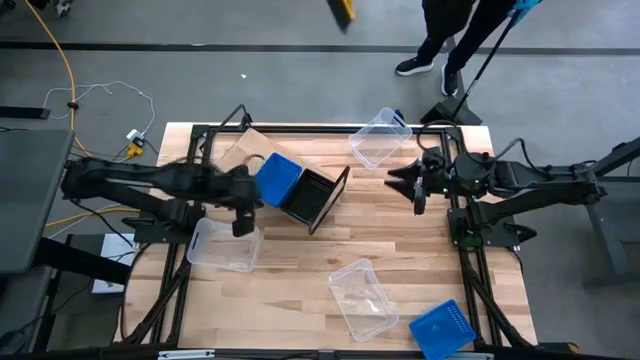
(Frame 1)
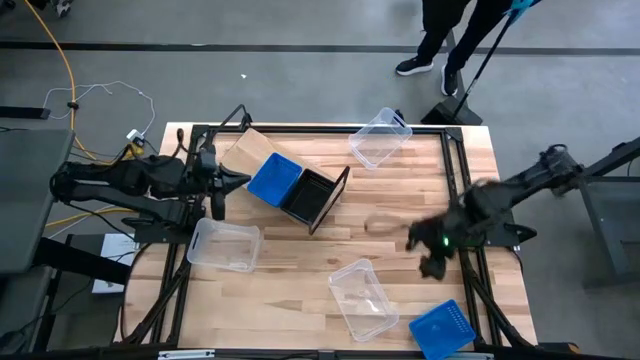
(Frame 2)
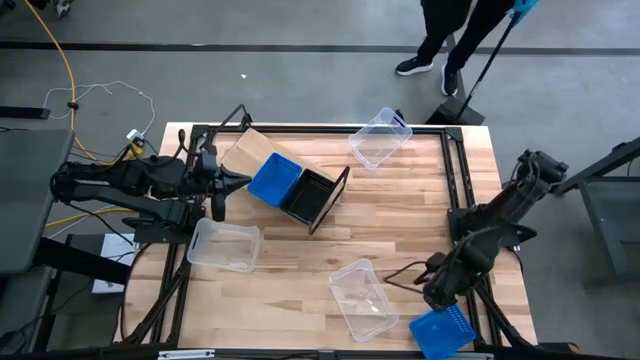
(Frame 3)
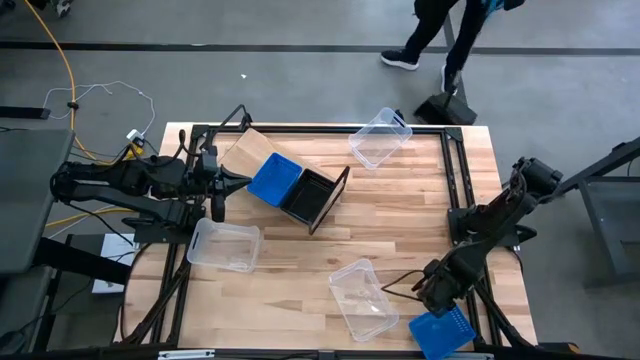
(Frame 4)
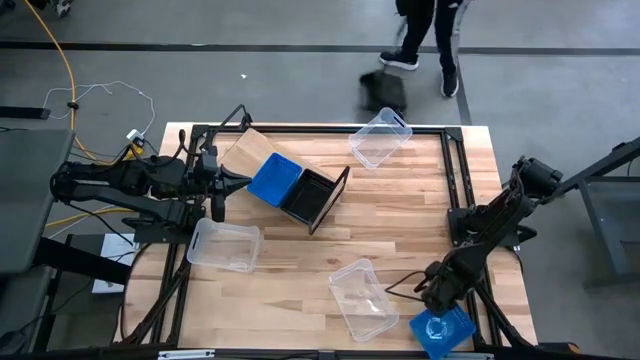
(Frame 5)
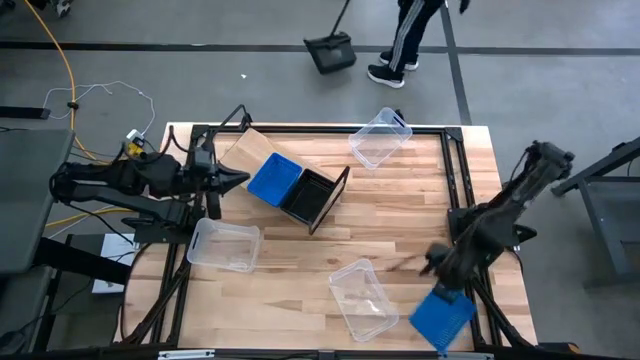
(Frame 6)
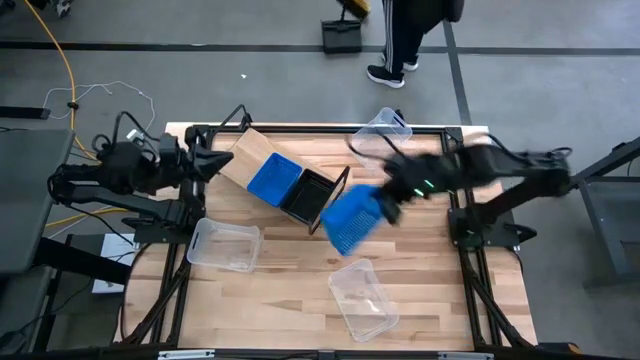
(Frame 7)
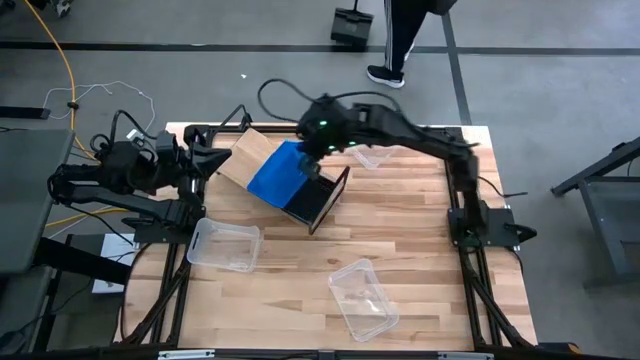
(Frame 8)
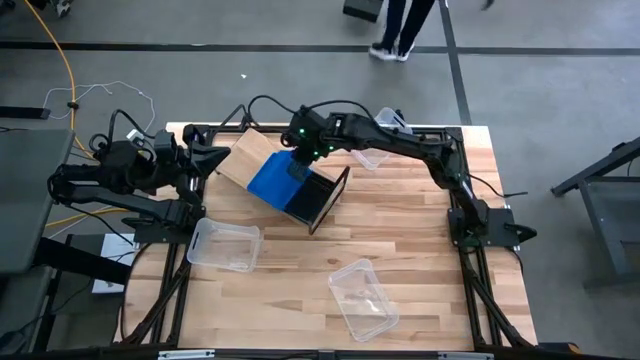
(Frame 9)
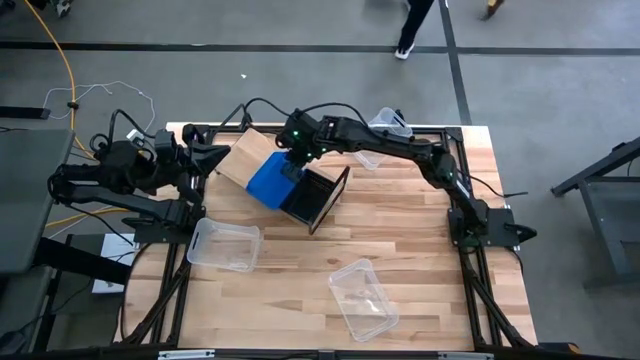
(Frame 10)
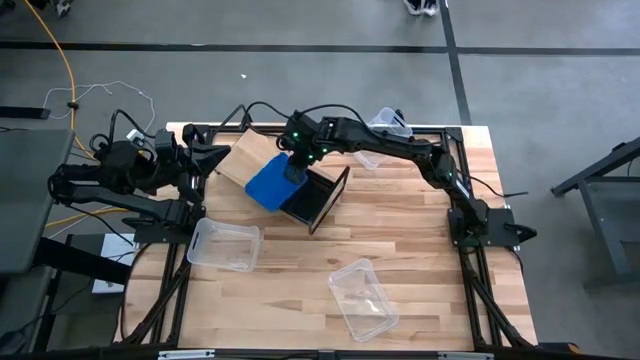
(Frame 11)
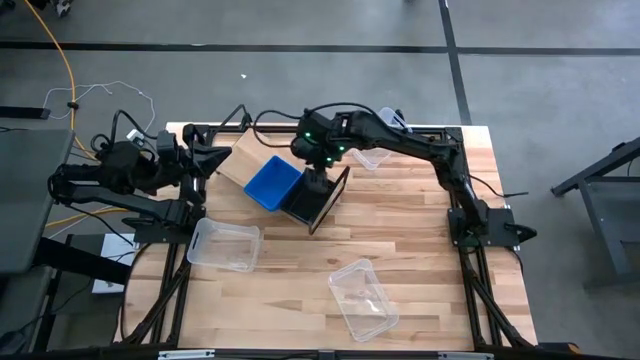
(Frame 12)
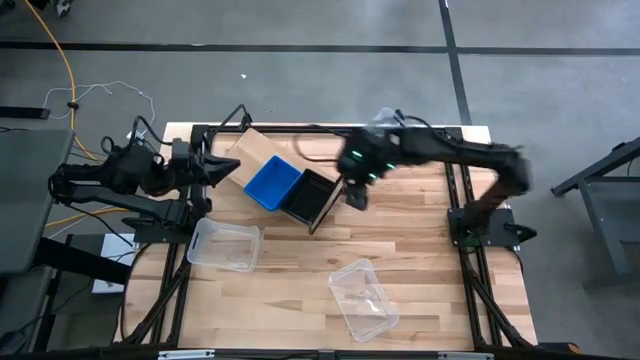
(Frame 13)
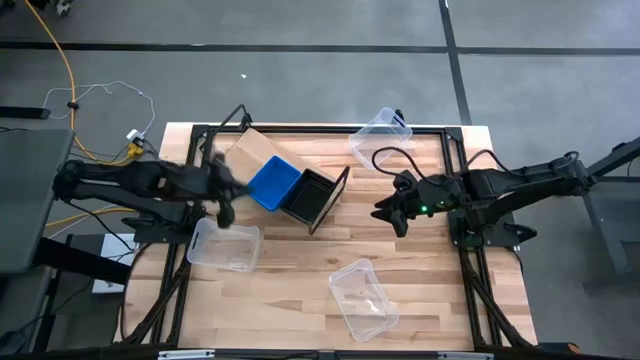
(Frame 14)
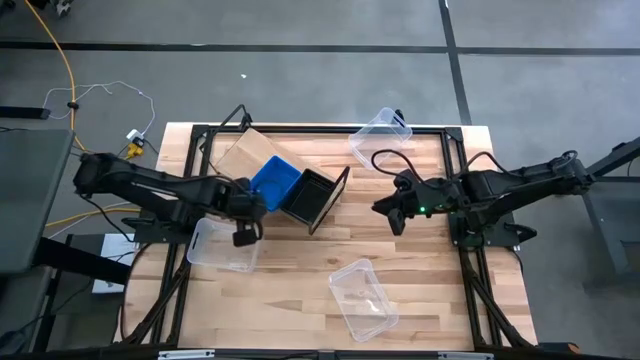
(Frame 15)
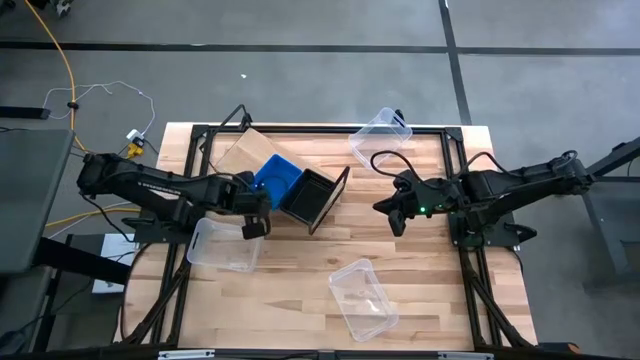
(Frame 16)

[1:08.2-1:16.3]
Task: Stack baskets on shelf by color
Stack the blue bin on top of the other blue bins on the shelf

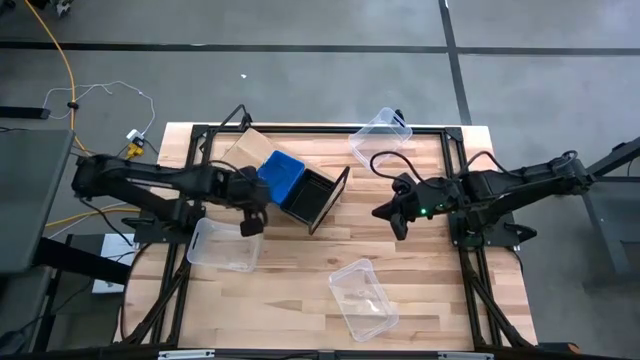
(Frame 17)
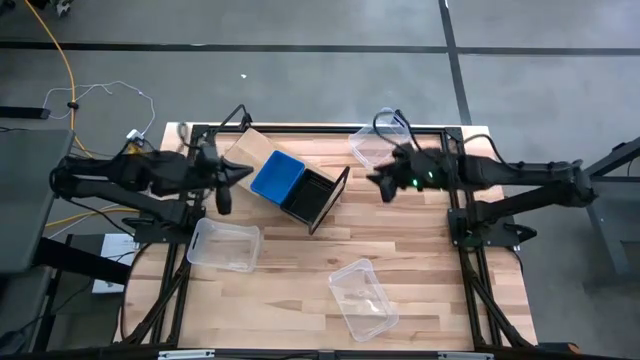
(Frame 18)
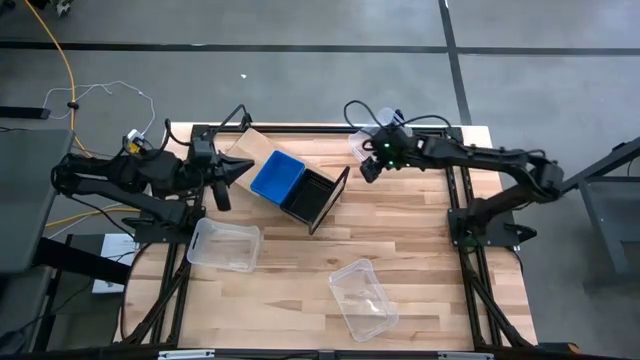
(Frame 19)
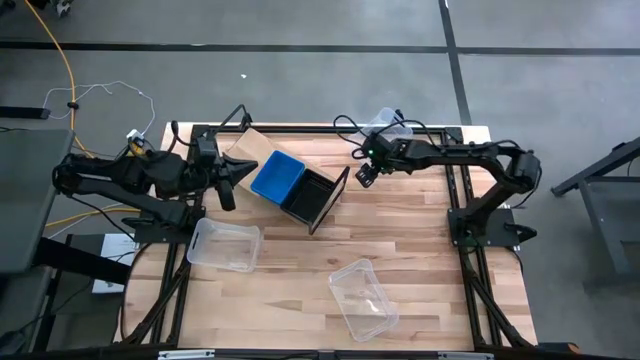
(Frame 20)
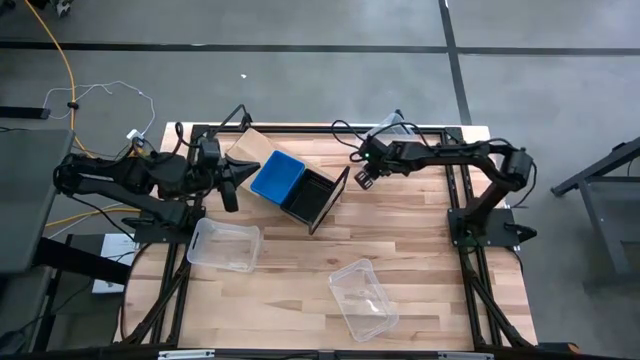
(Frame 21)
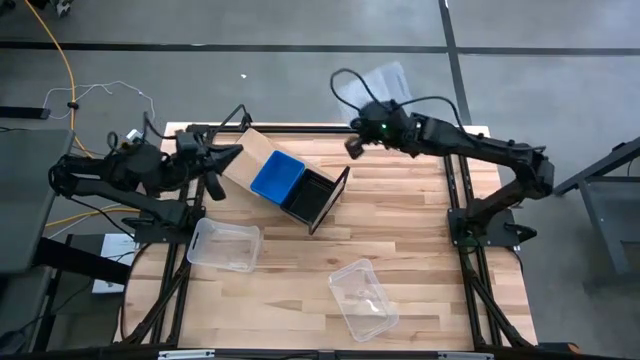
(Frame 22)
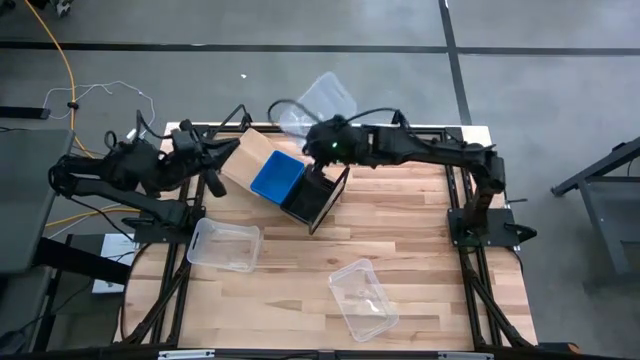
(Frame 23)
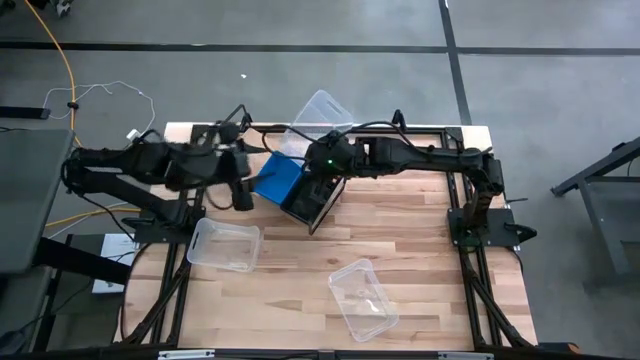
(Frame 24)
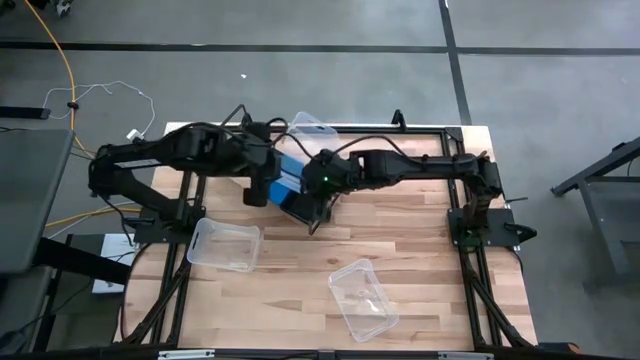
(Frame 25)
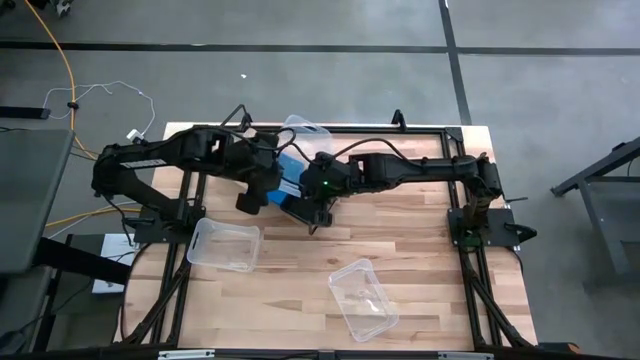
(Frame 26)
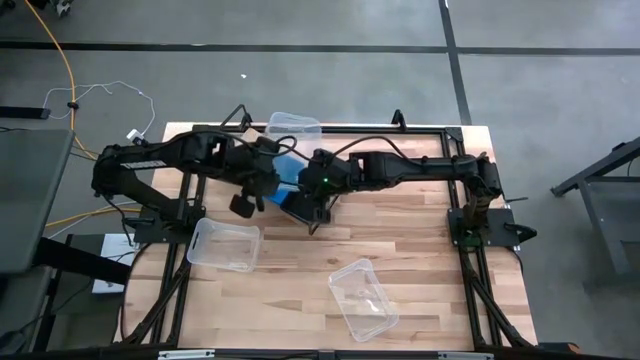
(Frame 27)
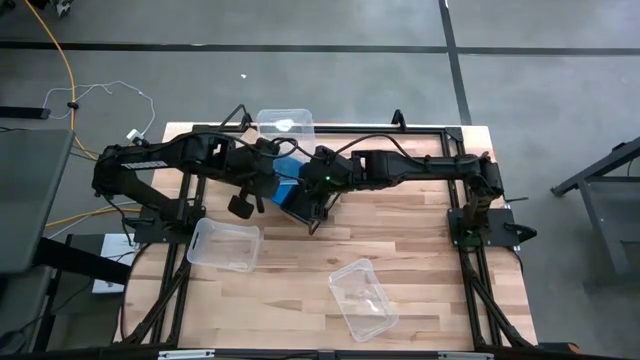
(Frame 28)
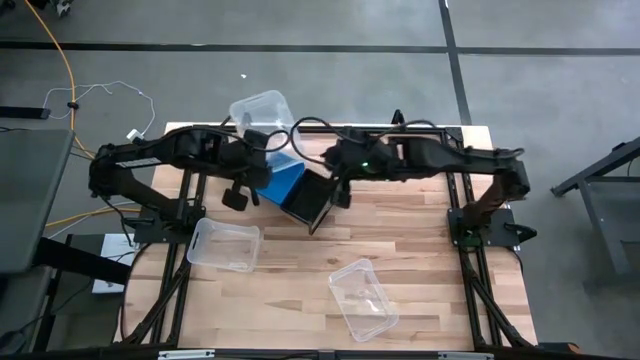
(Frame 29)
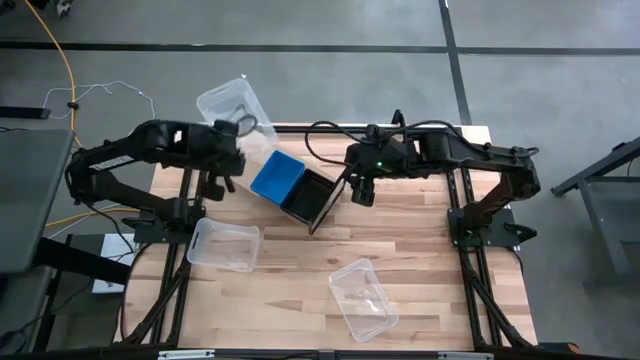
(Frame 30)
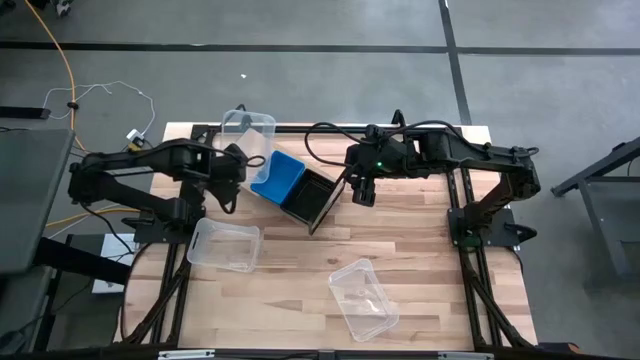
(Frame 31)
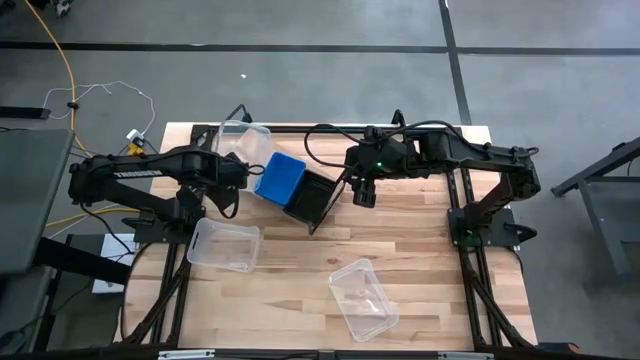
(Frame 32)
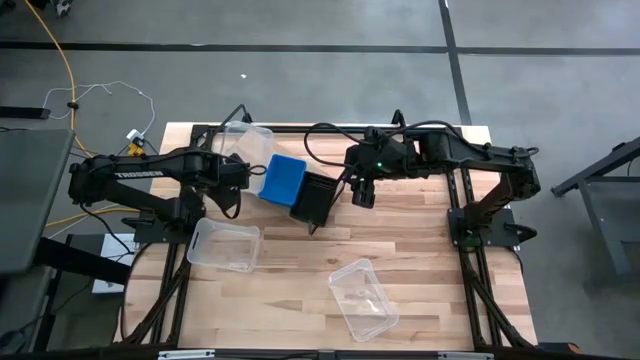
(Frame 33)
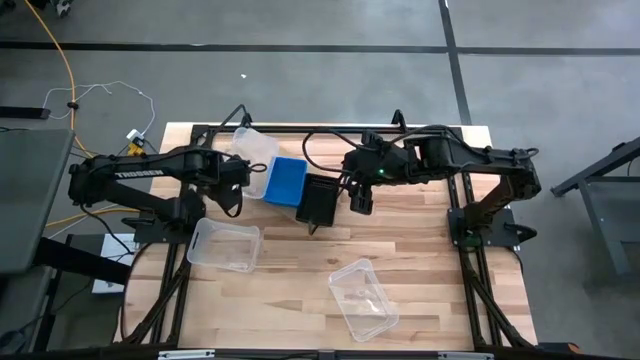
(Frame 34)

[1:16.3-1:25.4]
Put the top transparent bin on the shelf

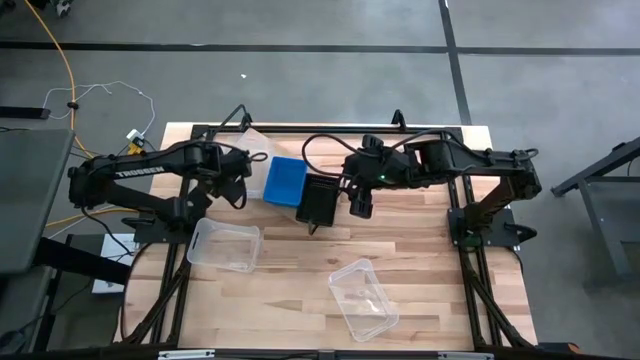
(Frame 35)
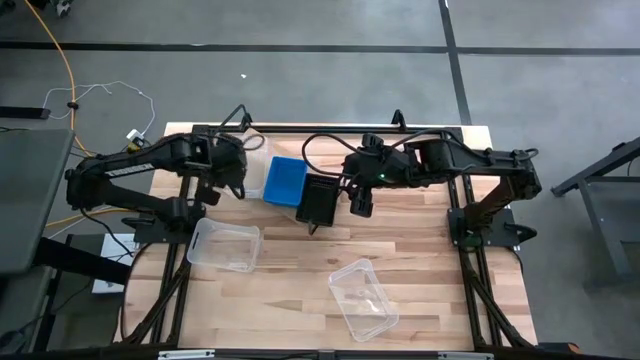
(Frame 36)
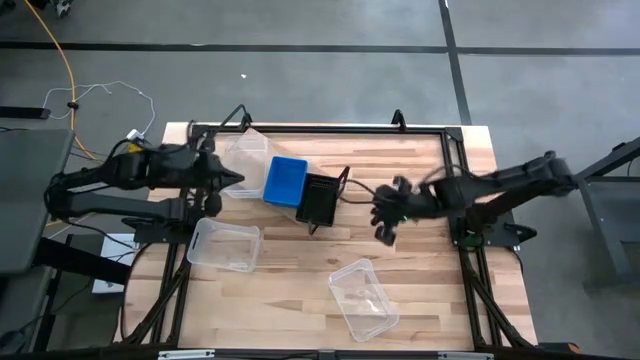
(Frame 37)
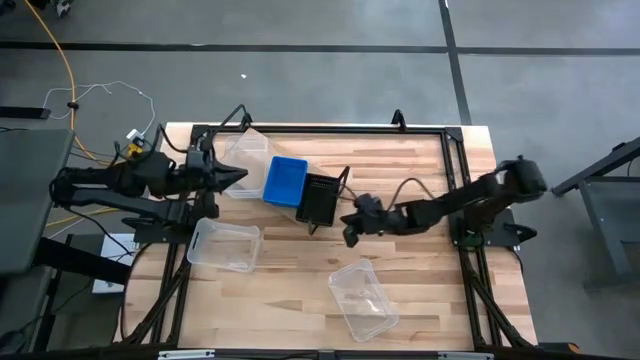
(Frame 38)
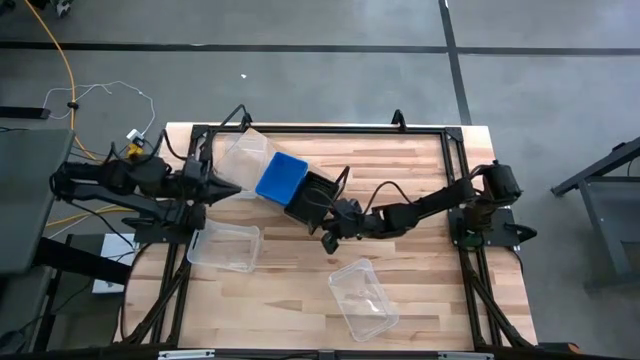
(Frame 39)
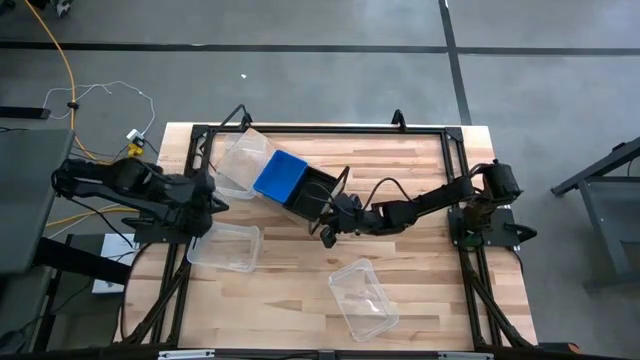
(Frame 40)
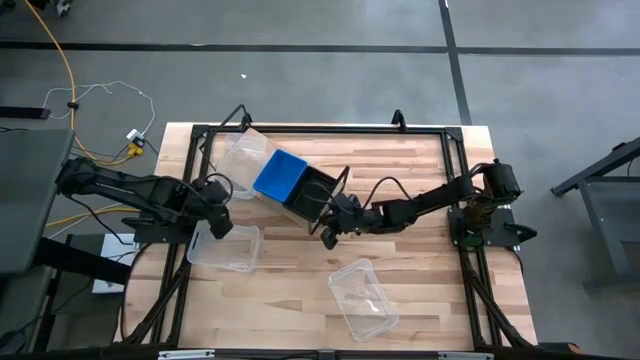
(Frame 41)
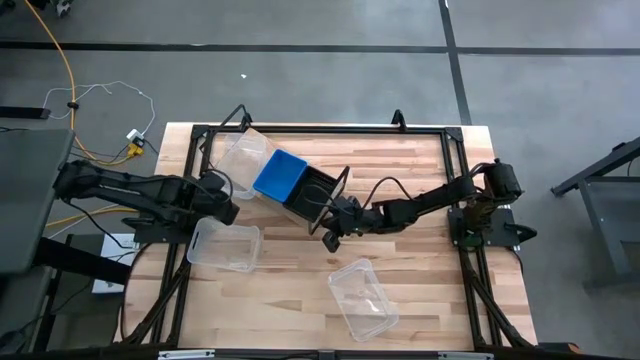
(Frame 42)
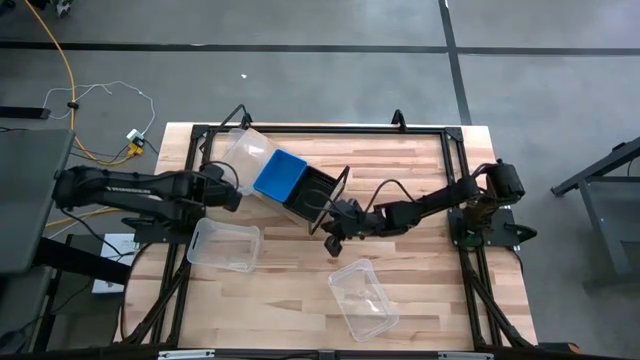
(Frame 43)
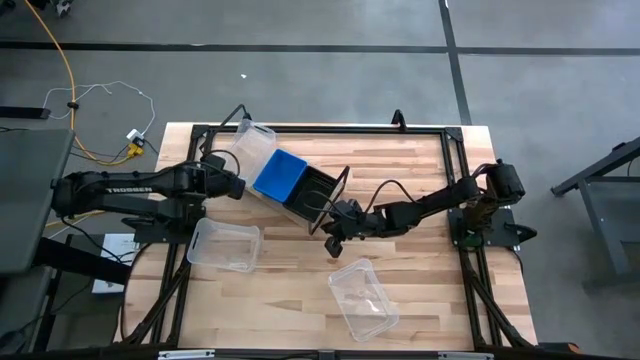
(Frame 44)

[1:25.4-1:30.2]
Adjust the bins on the shelf
